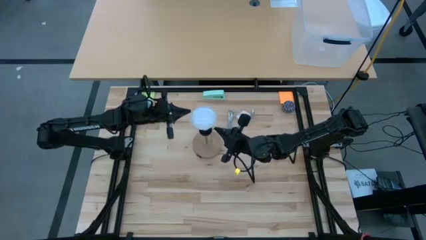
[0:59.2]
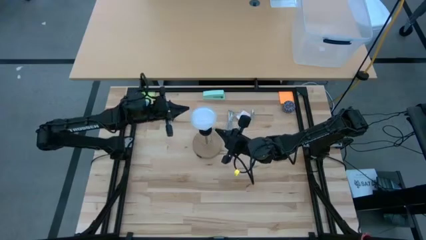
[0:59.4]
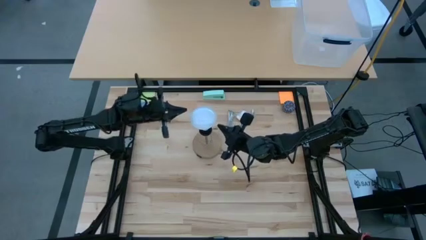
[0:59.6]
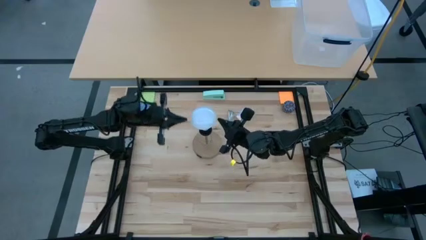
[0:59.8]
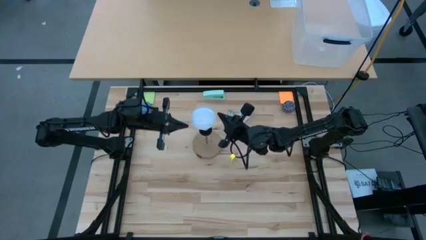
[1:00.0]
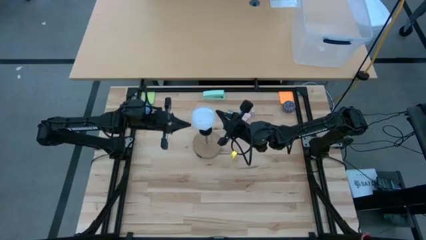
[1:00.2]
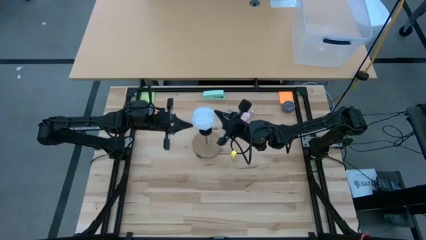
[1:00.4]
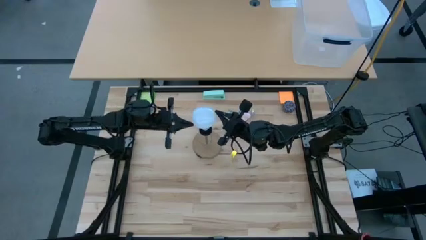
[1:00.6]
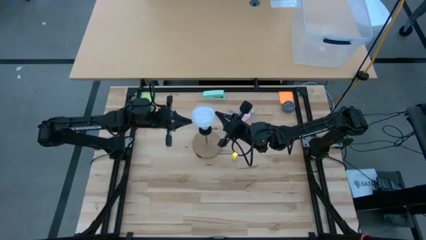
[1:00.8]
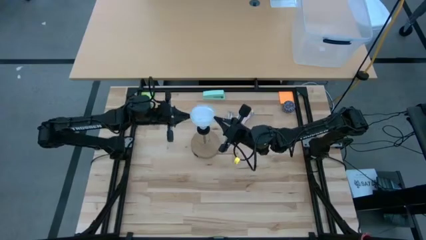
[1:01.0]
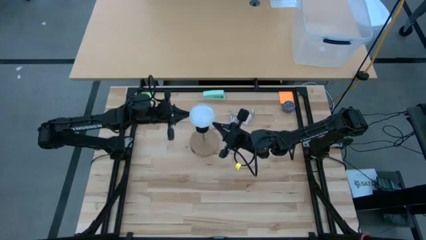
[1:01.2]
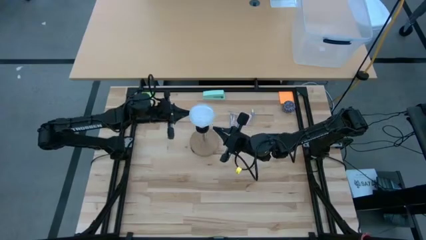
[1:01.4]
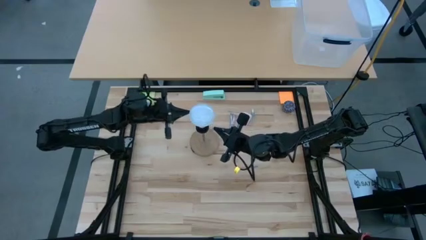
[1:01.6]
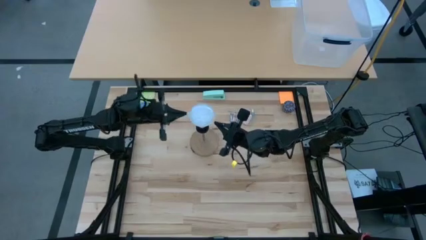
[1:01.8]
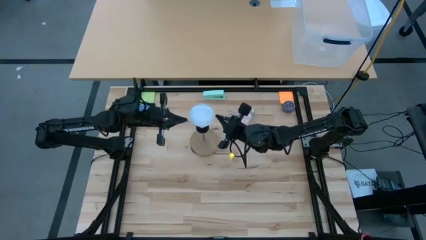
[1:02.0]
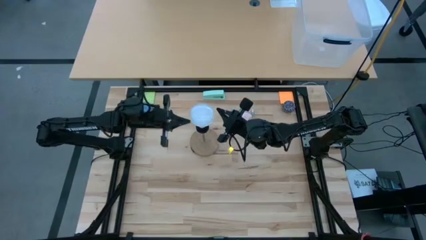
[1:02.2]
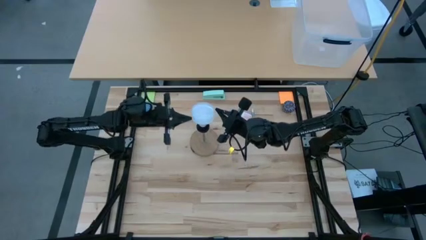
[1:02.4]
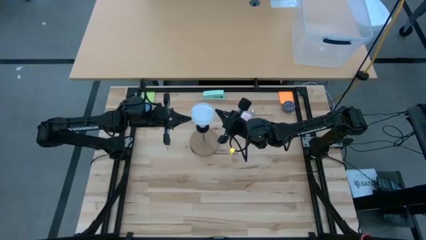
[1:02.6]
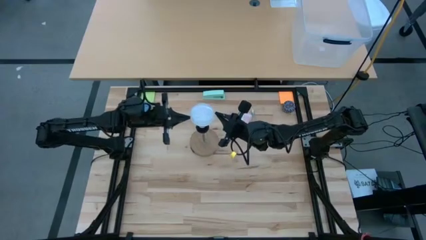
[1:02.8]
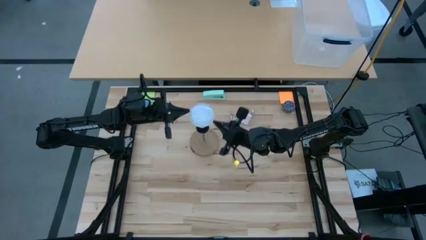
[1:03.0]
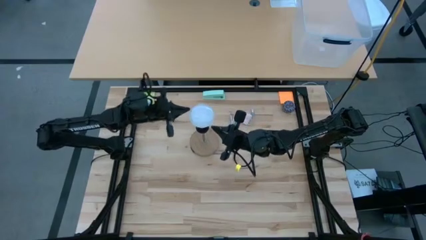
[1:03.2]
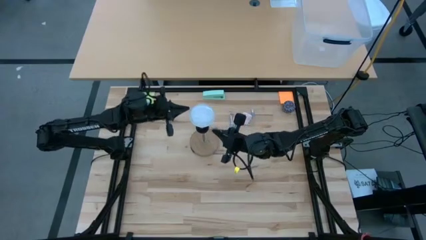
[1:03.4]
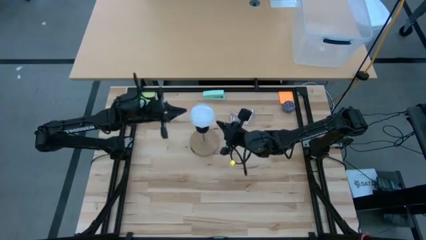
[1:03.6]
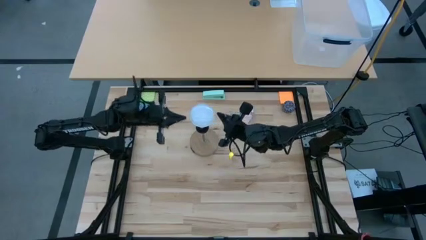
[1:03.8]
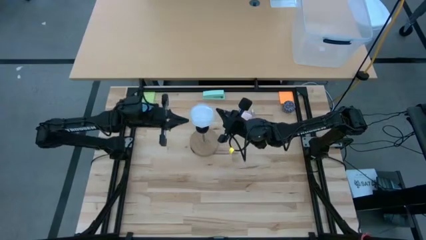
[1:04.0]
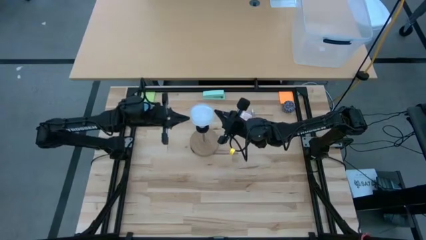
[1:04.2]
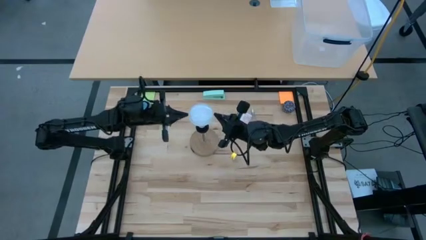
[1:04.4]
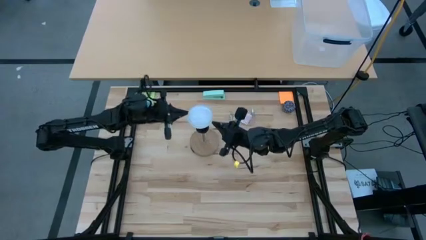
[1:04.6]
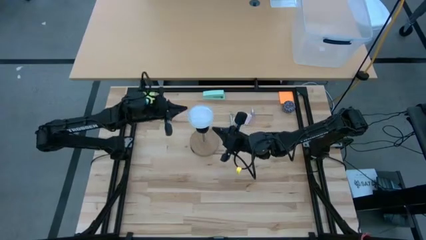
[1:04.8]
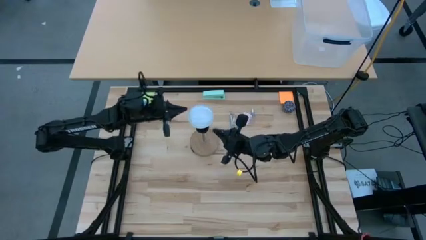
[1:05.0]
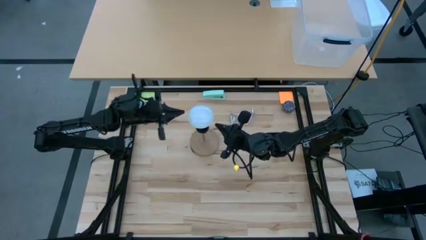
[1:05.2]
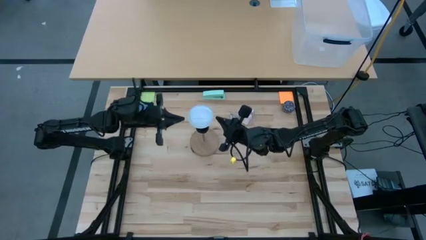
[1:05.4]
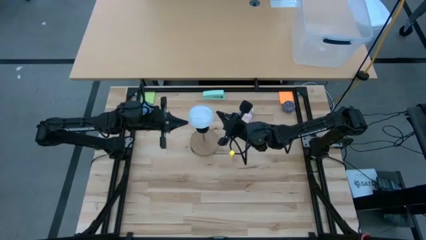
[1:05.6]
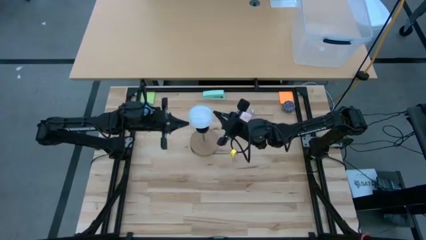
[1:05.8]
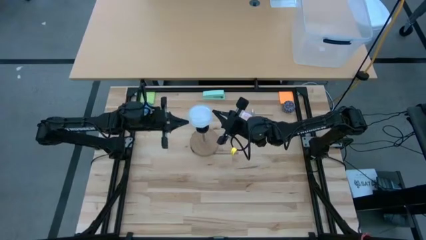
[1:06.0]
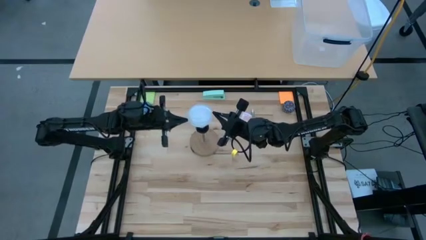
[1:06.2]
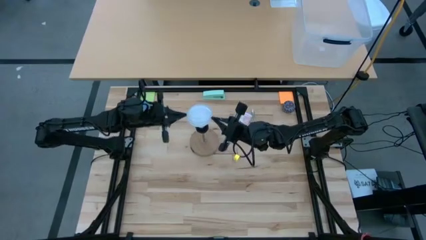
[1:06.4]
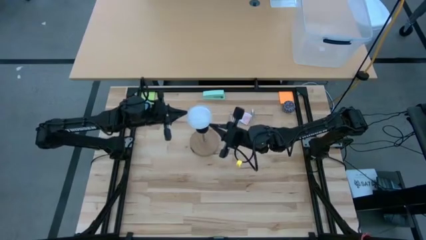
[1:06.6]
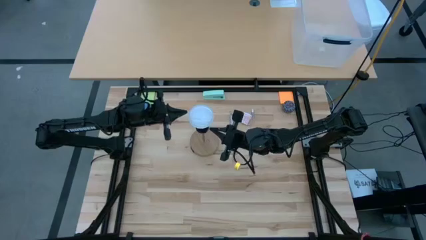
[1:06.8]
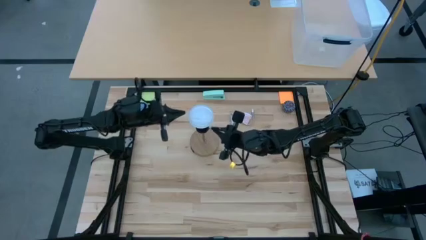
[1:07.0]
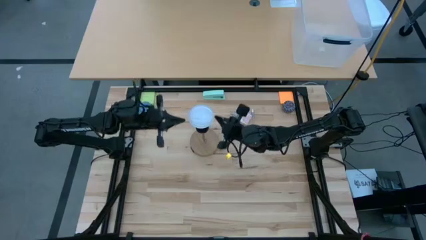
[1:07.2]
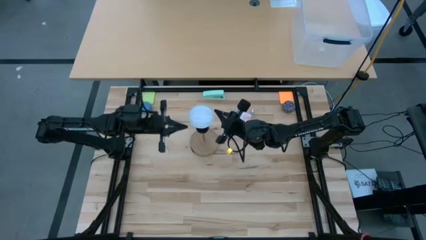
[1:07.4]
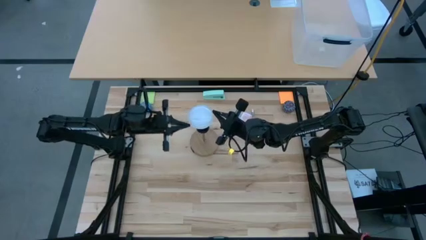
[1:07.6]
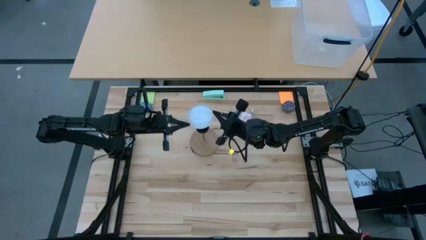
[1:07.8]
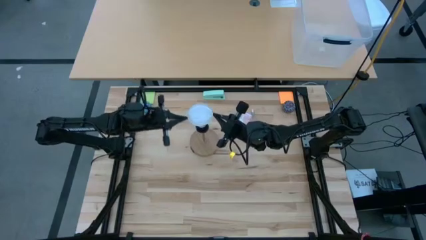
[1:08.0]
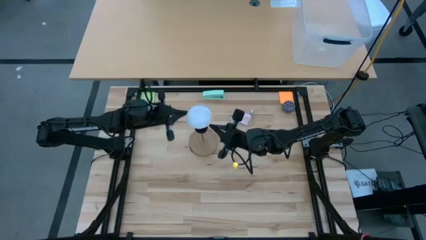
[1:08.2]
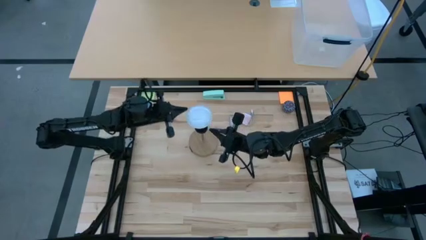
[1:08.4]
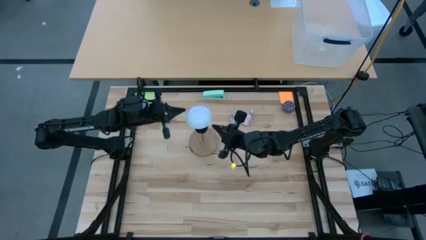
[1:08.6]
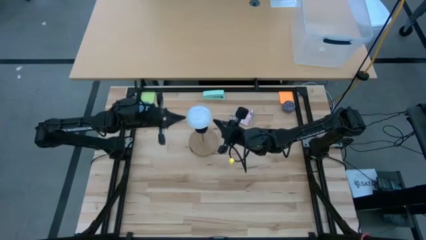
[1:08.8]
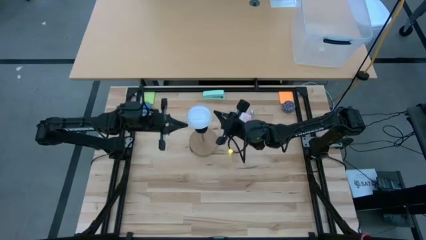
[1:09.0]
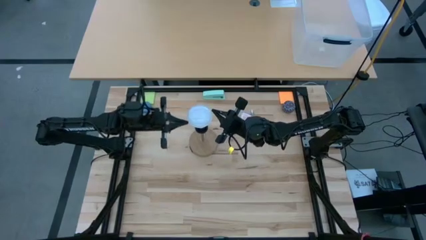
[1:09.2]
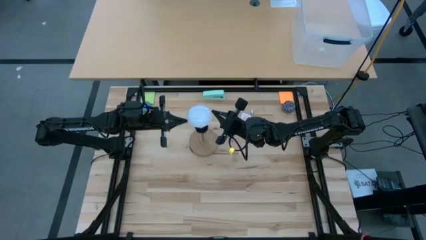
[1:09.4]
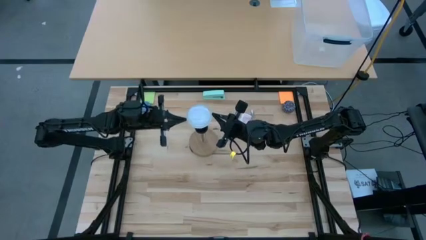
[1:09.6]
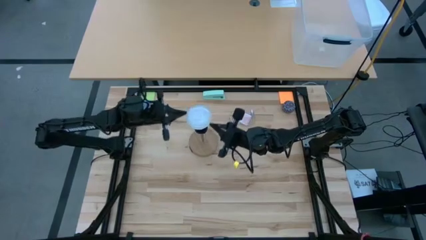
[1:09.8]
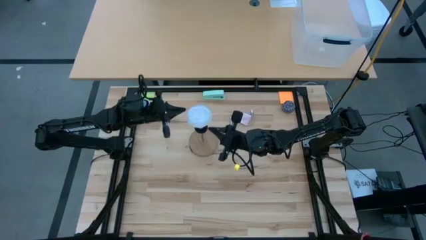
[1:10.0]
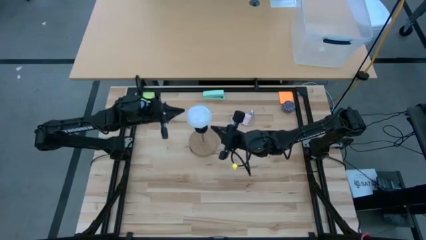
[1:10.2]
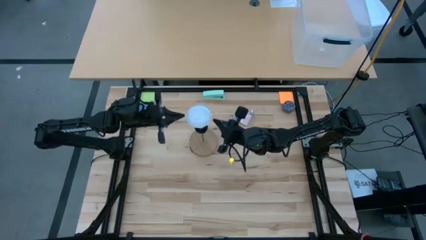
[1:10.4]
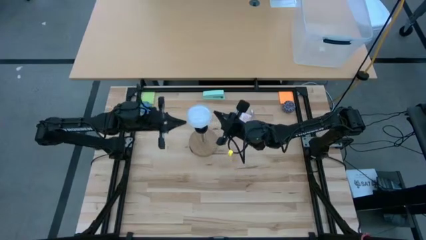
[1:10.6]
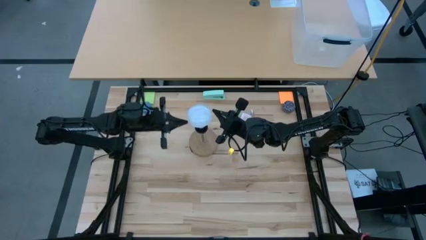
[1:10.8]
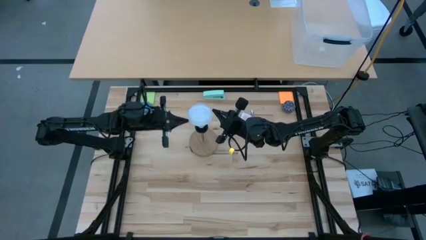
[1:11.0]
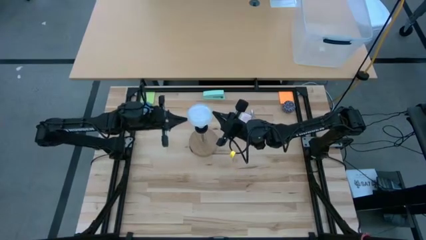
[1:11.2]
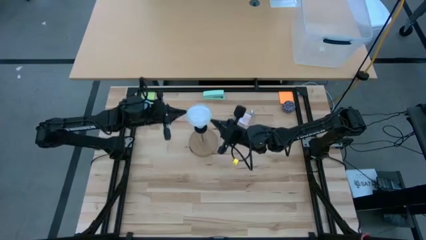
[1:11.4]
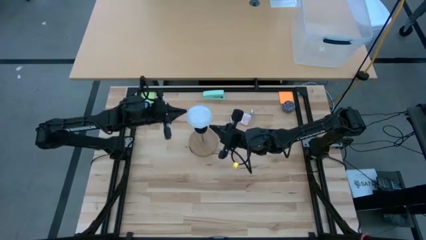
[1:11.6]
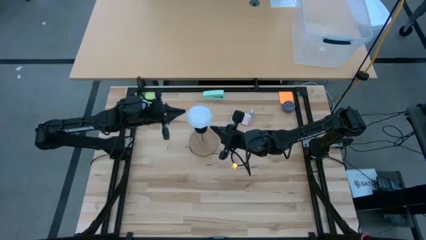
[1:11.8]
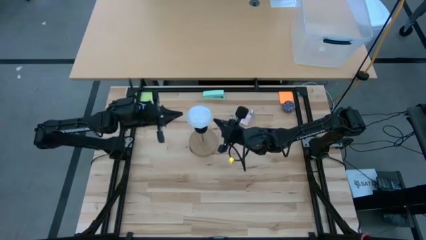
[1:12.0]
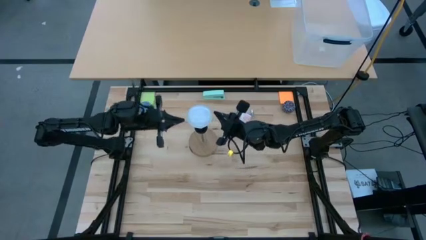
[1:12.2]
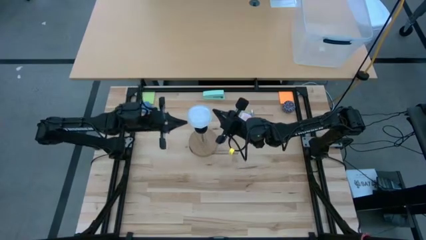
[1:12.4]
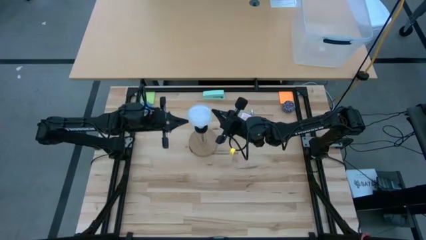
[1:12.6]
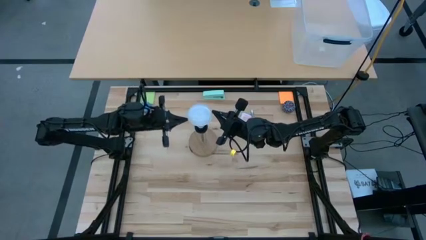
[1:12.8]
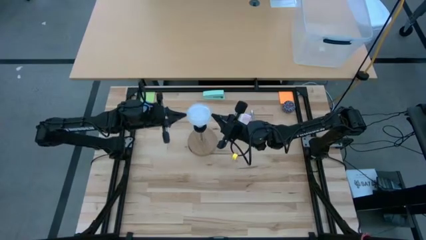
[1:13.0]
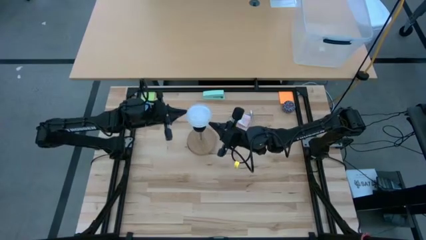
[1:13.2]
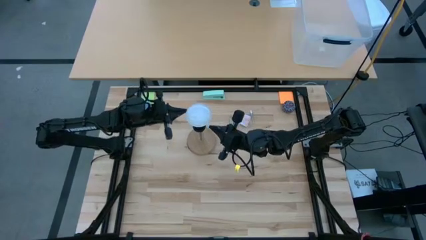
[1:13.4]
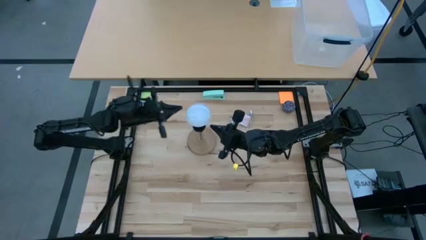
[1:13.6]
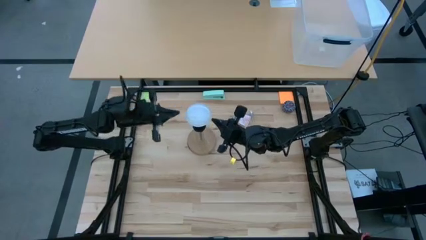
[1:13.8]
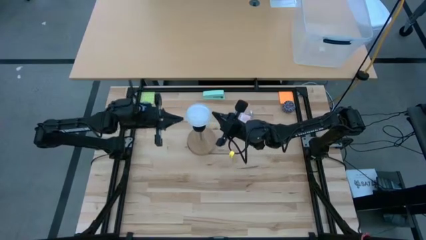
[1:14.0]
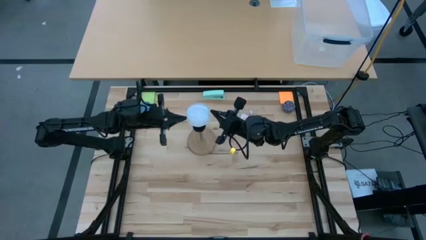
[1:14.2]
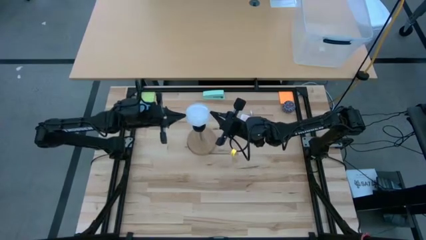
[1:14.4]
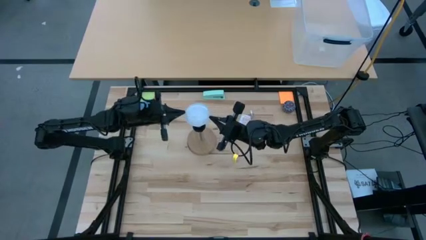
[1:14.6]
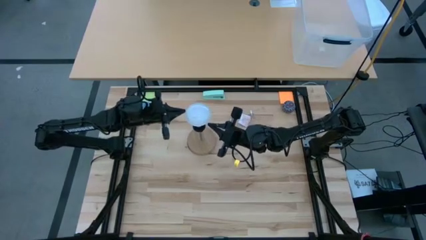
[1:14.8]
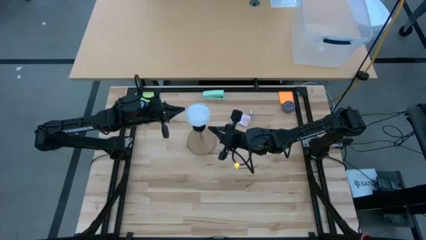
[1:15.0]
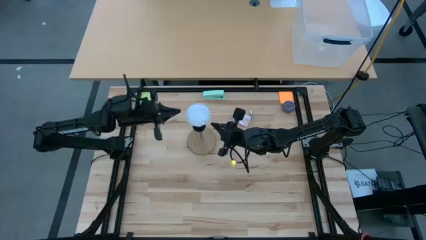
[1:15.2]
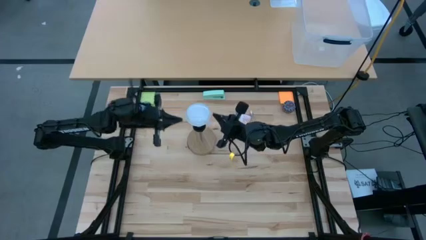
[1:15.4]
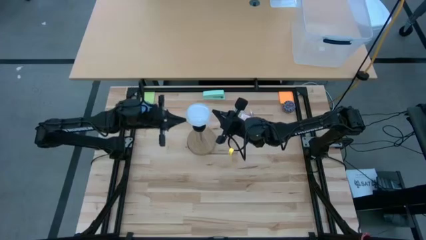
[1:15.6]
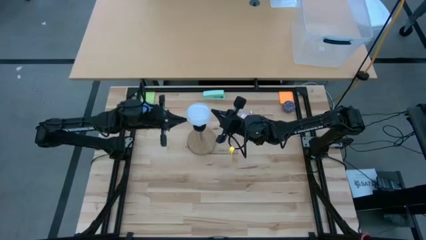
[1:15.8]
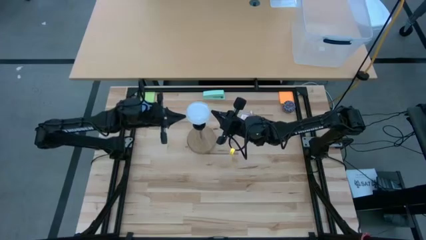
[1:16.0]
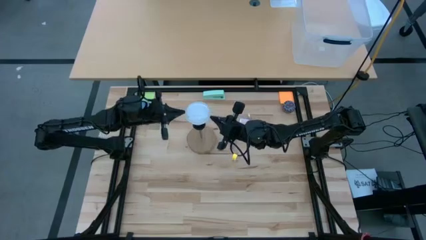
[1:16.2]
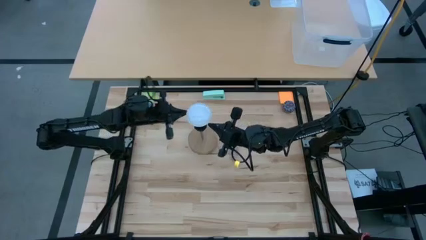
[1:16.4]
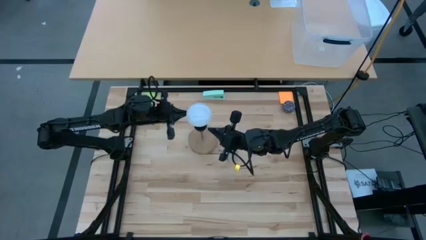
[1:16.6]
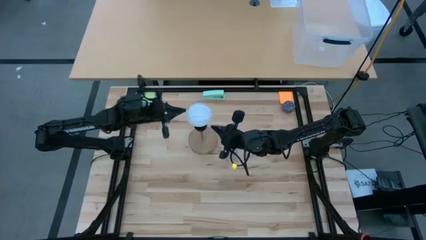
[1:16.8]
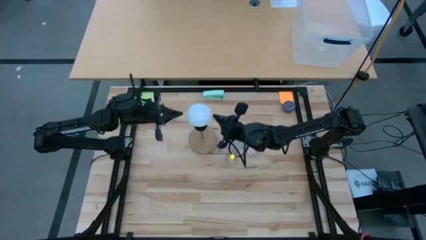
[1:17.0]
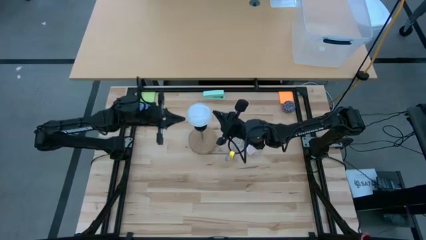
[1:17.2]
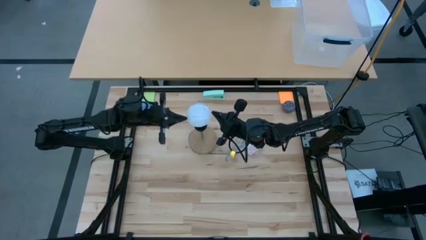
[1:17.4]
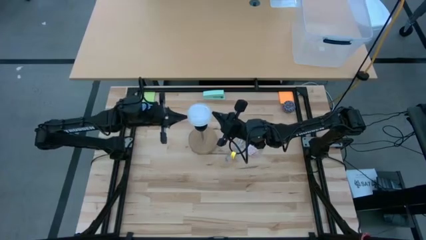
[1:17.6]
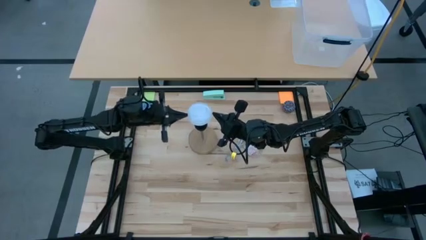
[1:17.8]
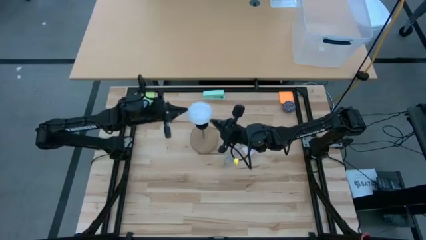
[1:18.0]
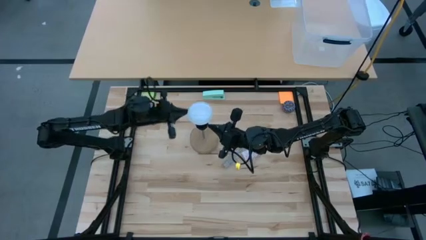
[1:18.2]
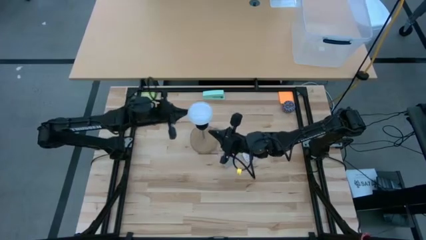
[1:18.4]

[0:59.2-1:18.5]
Task: Screw lightbulb
Insert the lightbulb into the lamp socket
